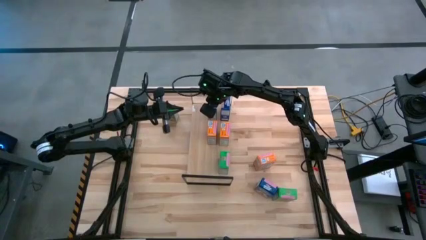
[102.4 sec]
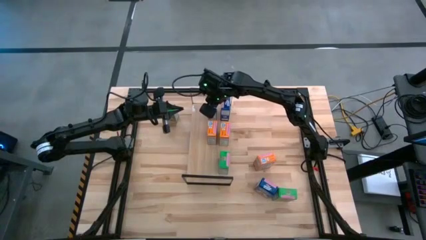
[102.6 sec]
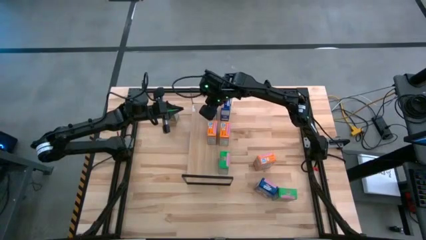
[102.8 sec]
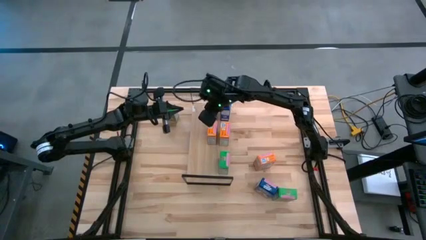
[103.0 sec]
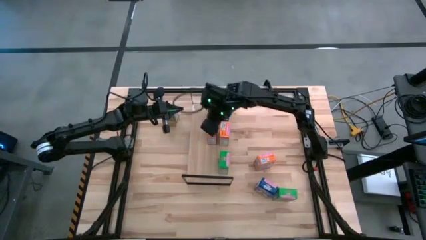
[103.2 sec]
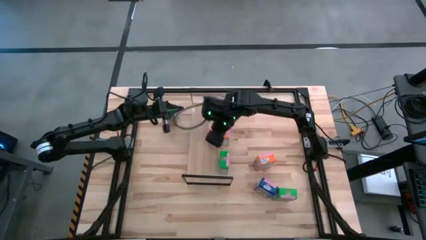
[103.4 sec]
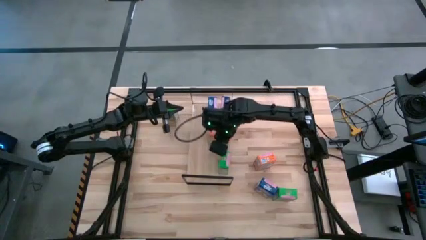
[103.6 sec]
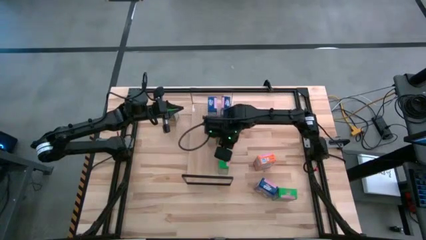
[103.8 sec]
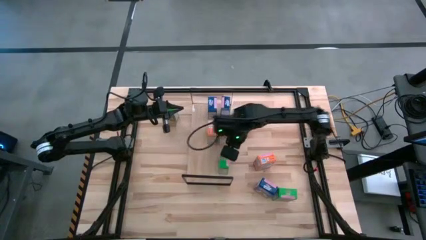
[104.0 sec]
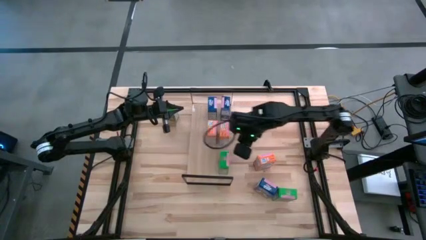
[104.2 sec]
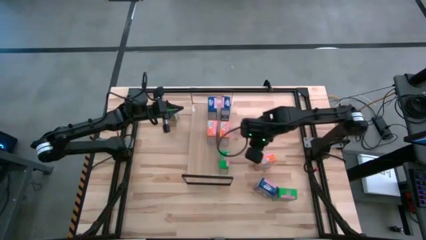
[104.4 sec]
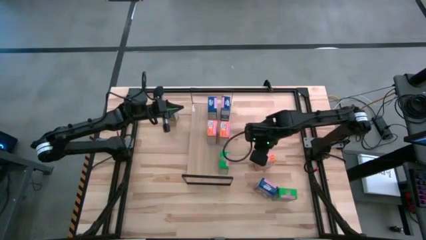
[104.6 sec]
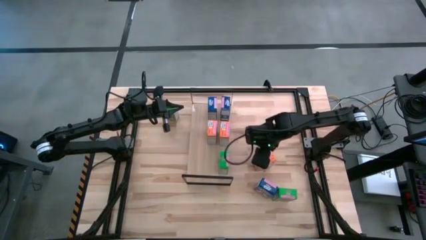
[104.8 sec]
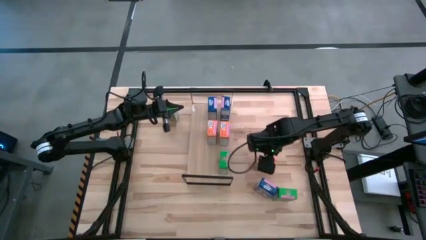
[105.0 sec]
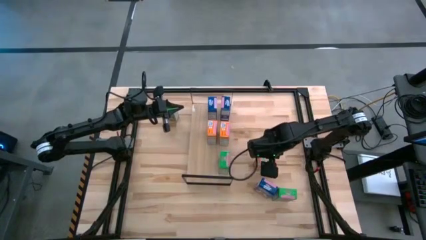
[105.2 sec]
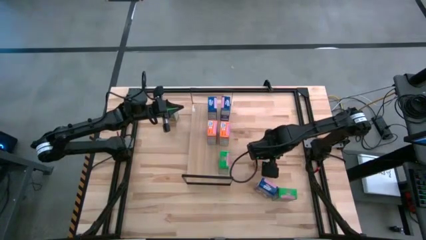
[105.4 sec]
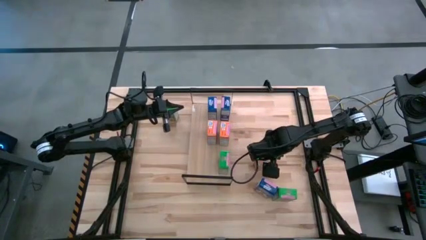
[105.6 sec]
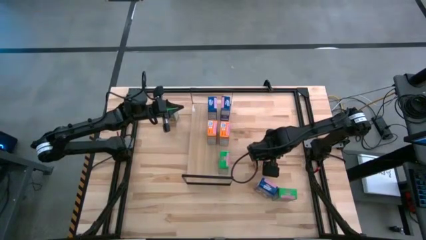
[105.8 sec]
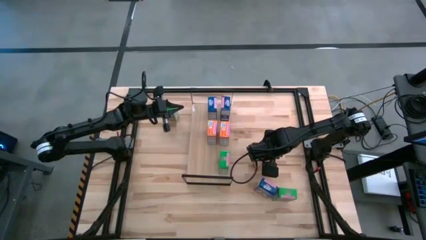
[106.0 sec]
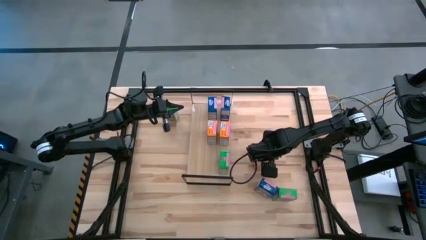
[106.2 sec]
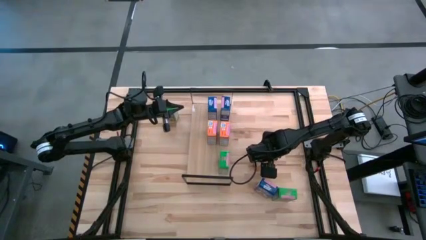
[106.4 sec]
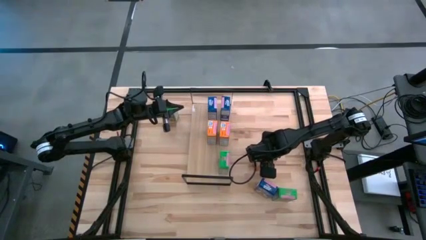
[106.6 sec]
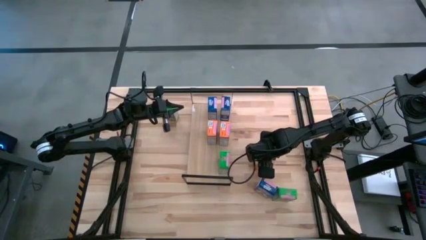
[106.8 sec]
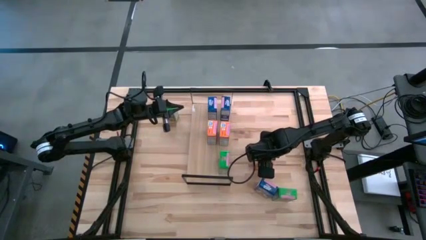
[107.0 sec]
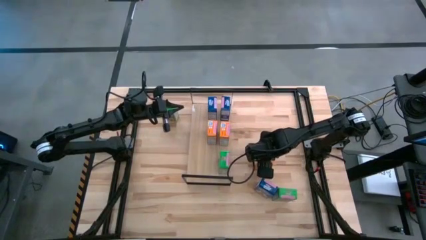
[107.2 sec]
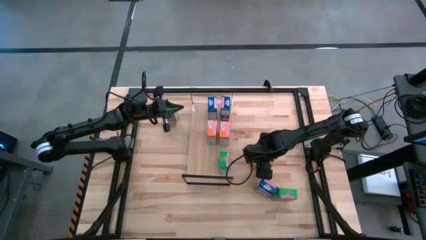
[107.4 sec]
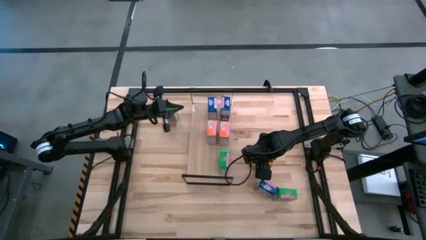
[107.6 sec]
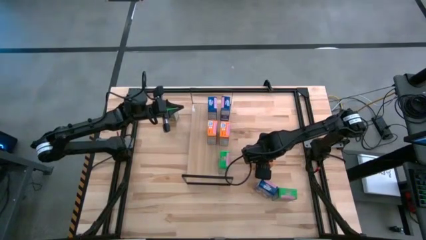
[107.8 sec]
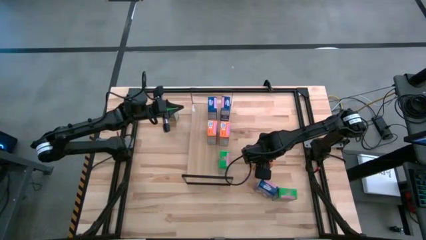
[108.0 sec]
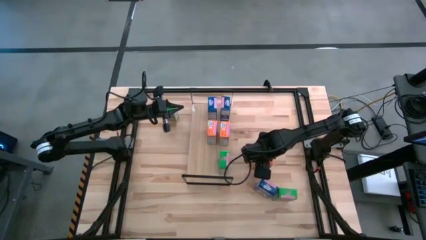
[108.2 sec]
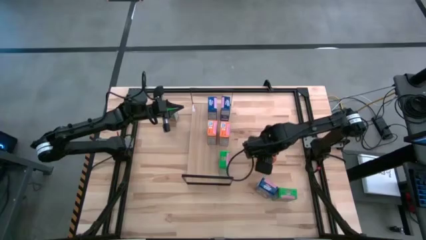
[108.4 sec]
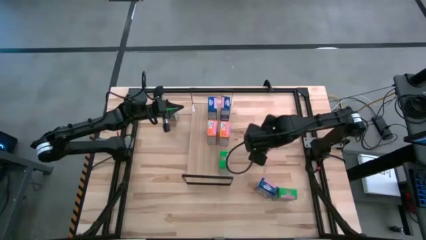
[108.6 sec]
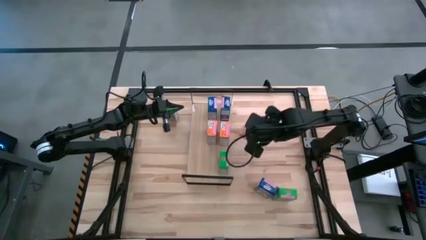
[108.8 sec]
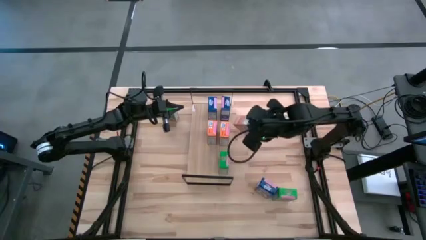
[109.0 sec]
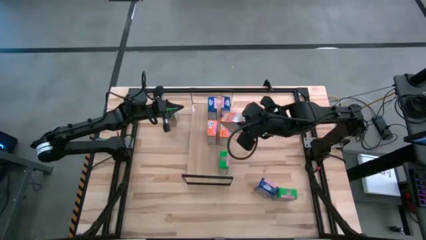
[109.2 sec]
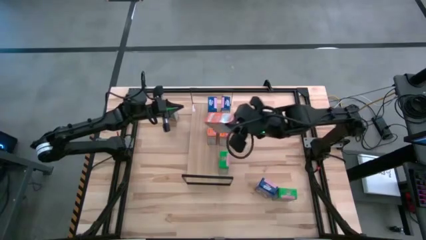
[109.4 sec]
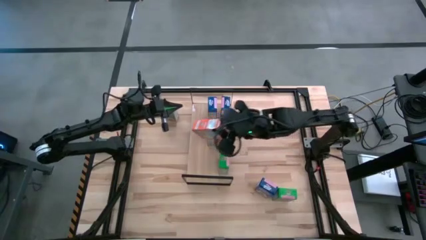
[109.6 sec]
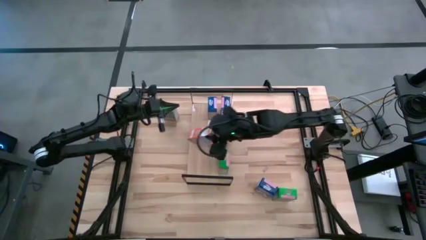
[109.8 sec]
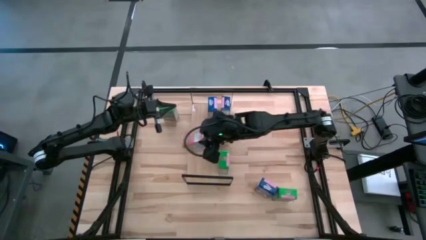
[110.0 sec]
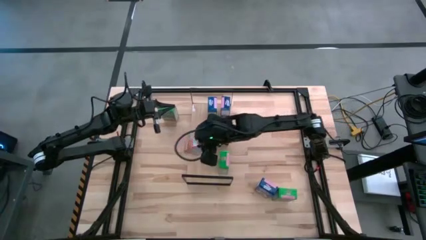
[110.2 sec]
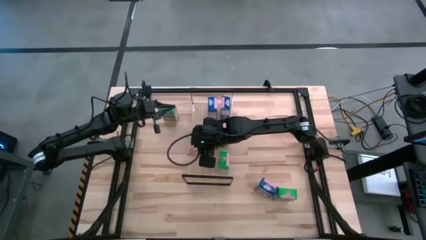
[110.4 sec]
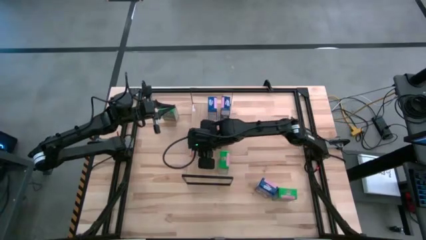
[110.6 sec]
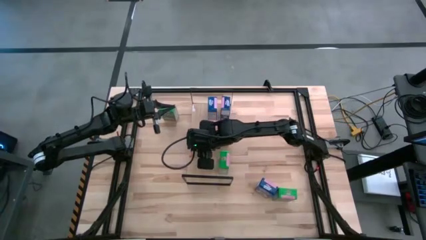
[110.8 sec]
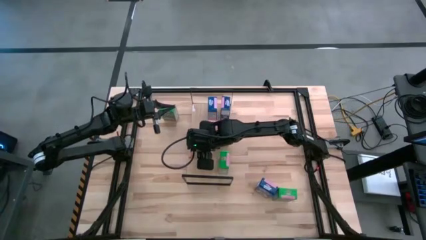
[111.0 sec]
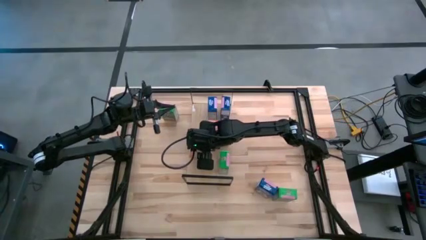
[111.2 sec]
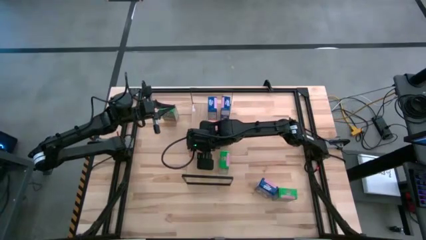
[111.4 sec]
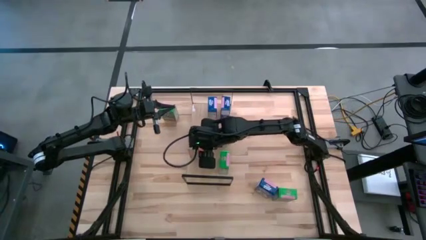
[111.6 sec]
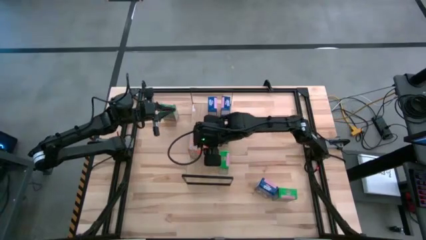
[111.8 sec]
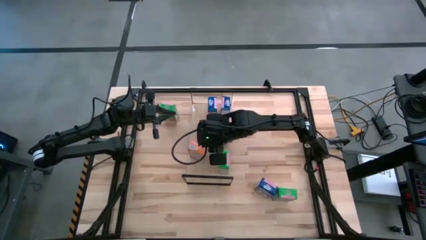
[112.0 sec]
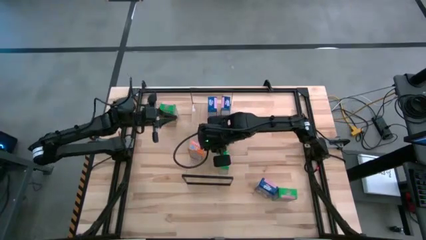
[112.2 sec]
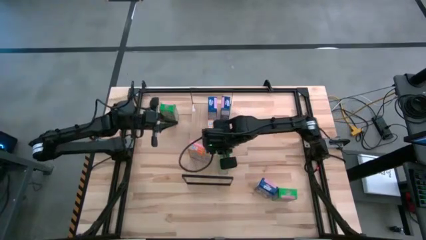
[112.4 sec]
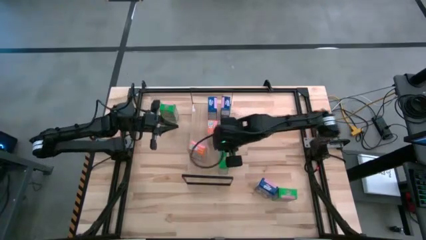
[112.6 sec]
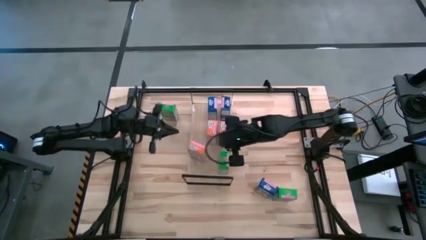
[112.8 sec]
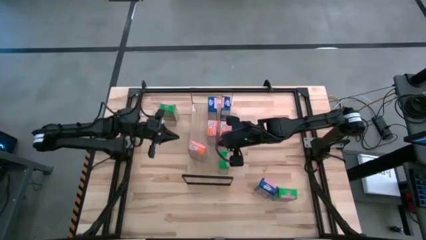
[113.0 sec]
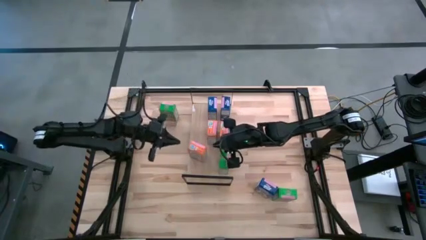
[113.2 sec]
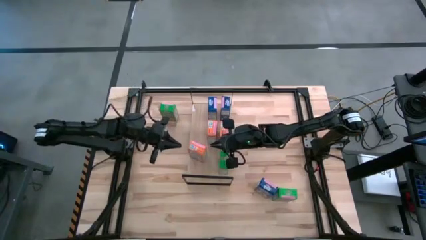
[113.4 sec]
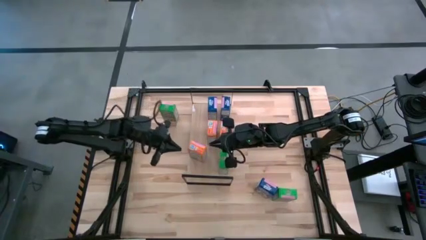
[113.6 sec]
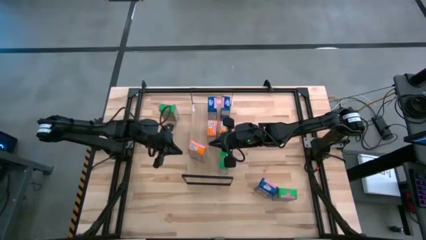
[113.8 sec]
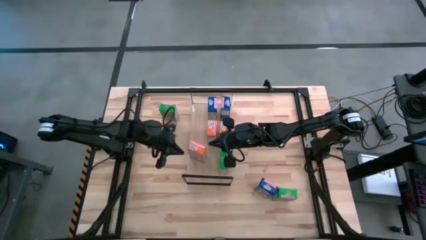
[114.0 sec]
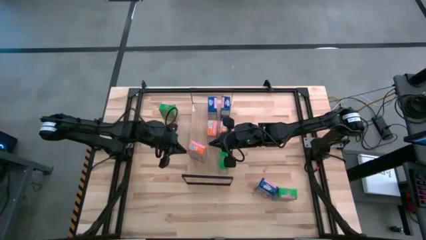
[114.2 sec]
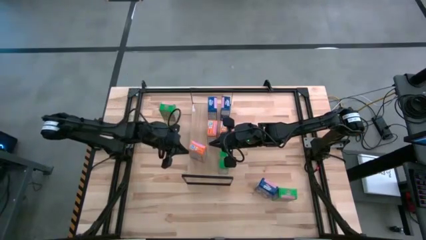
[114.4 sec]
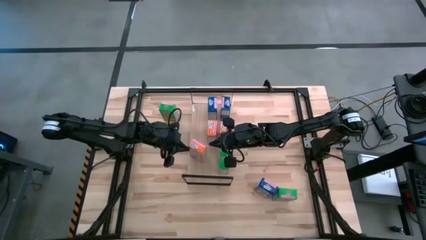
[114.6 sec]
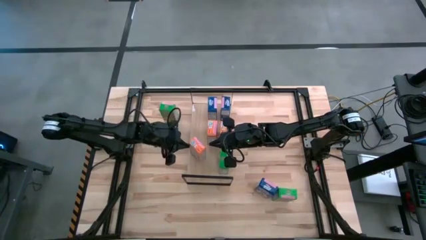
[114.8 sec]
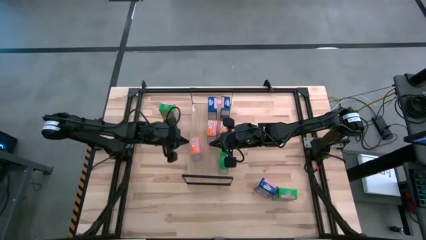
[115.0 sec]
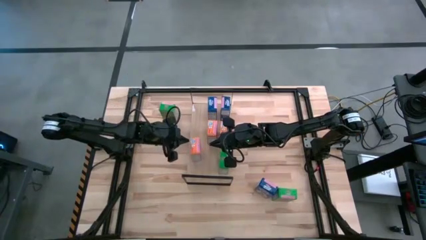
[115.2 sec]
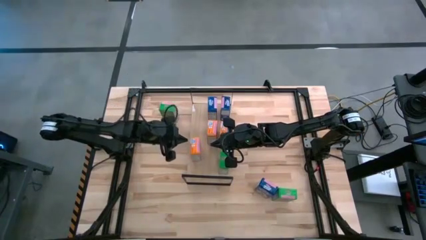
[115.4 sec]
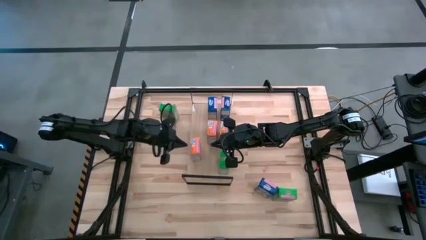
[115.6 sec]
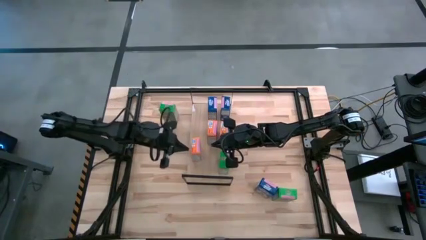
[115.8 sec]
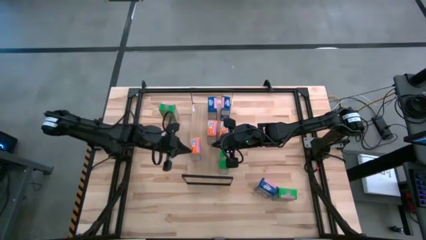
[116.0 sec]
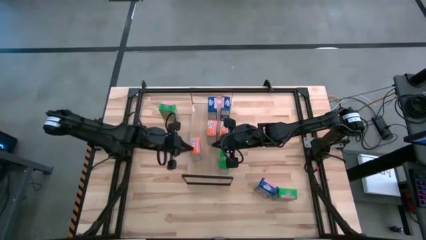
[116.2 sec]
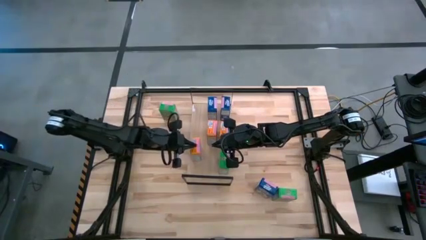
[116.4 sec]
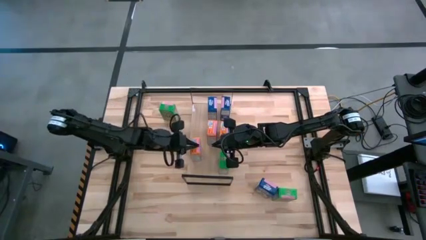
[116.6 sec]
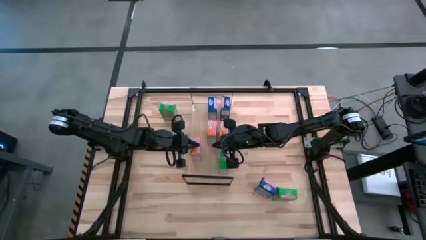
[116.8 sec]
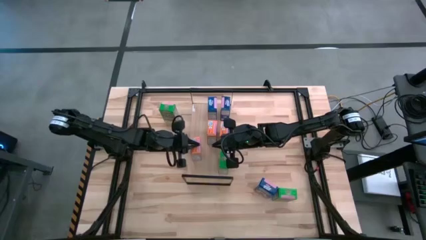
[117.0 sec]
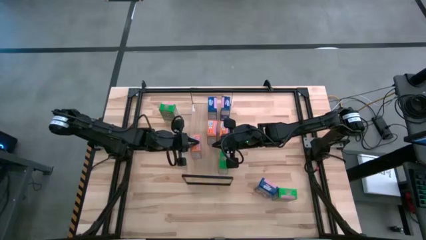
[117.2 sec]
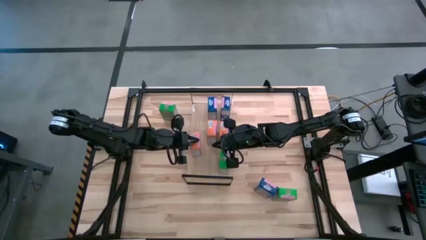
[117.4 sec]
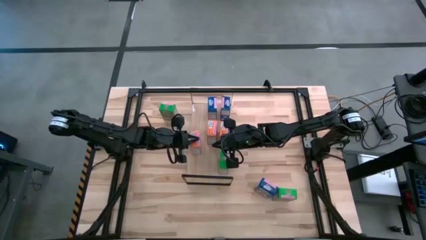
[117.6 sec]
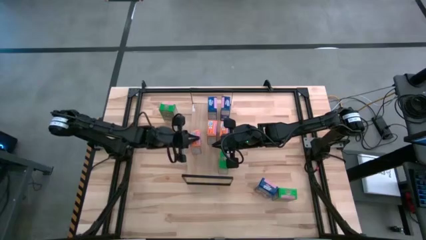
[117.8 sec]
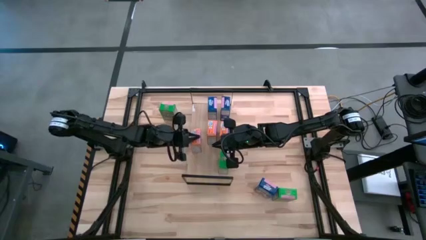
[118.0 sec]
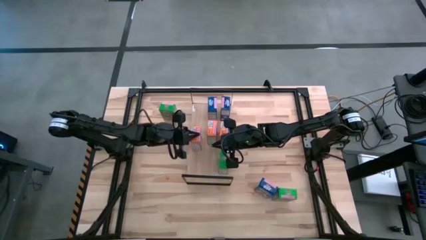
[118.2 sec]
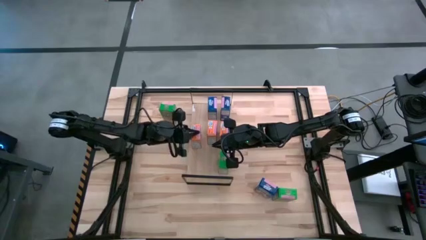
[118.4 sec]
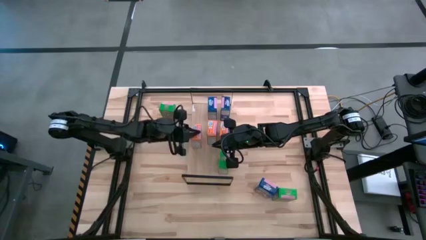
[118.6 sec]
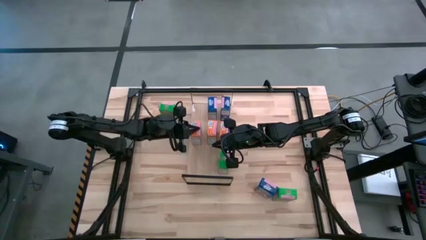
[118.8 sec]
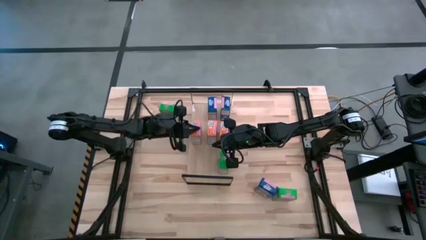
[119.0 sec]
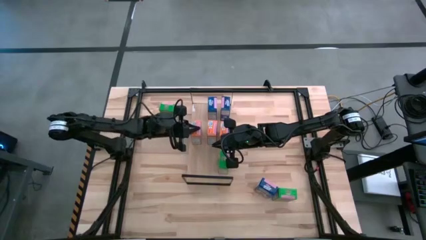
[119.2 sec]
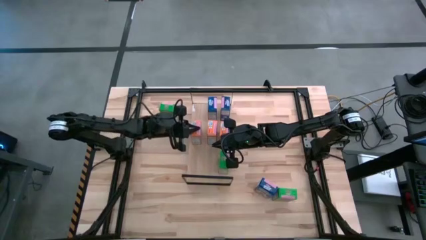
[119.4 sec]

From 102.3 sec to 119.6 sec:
Task: Stack cereal on shelf
Put the orange cereal box on the shelf aligned with the other orange cereal boxes
